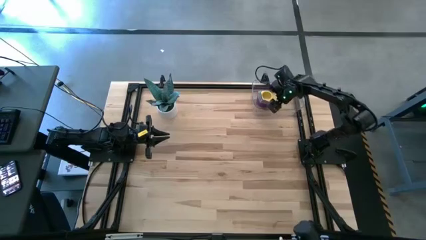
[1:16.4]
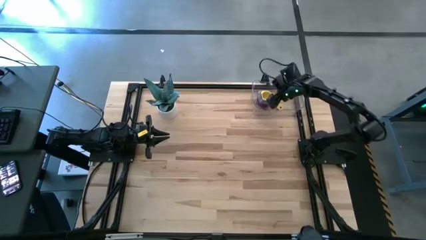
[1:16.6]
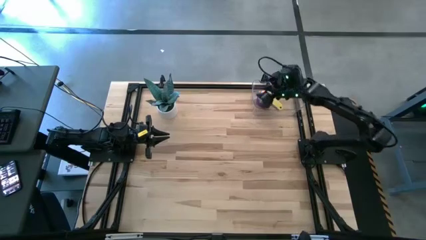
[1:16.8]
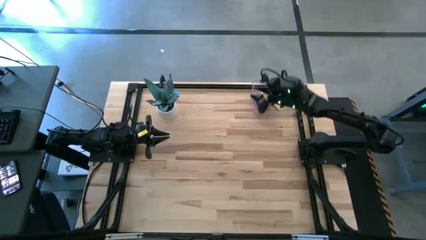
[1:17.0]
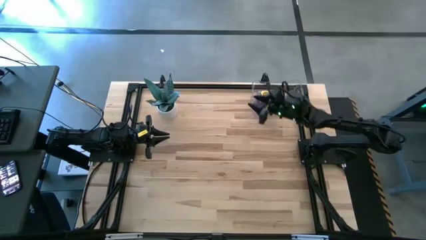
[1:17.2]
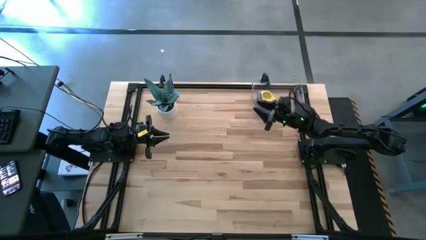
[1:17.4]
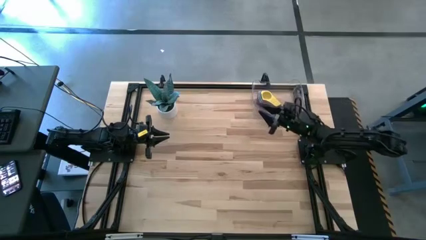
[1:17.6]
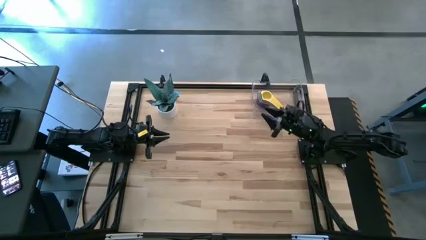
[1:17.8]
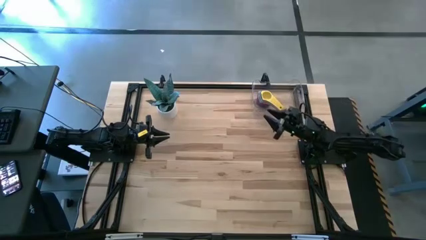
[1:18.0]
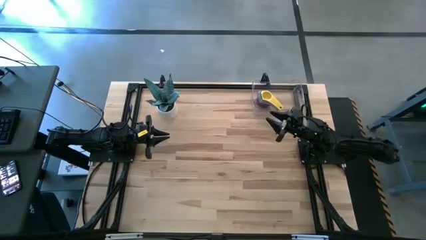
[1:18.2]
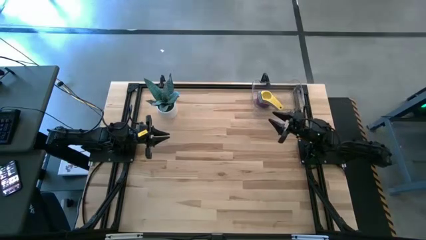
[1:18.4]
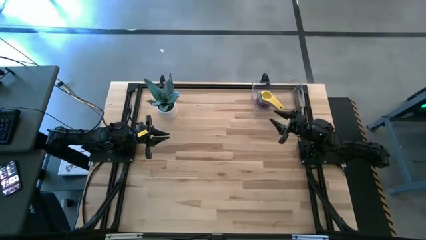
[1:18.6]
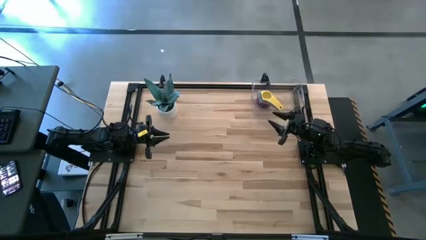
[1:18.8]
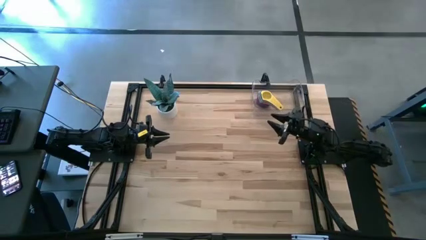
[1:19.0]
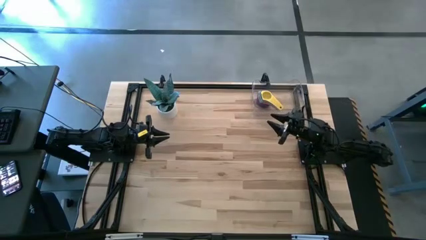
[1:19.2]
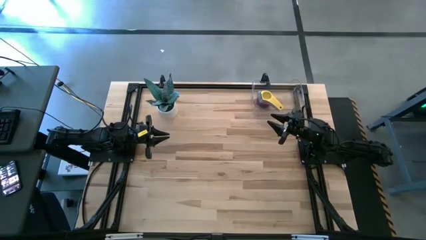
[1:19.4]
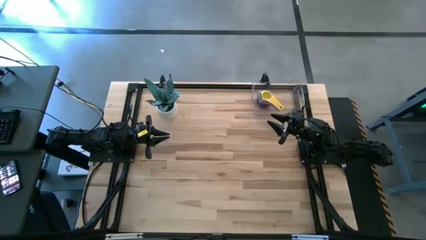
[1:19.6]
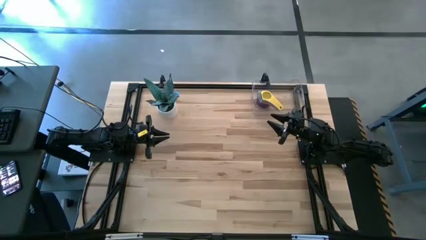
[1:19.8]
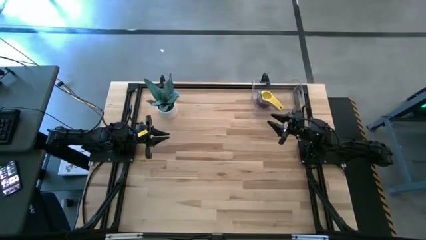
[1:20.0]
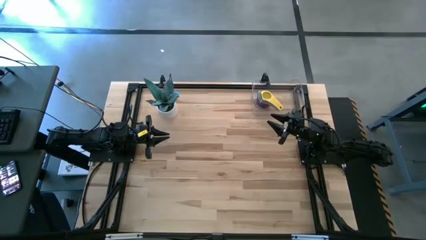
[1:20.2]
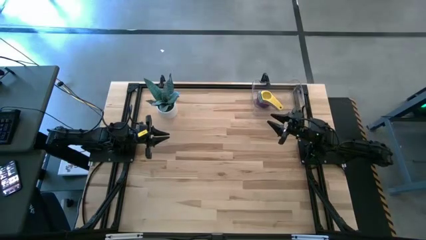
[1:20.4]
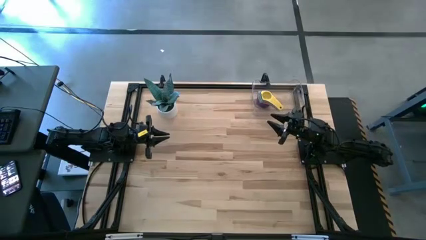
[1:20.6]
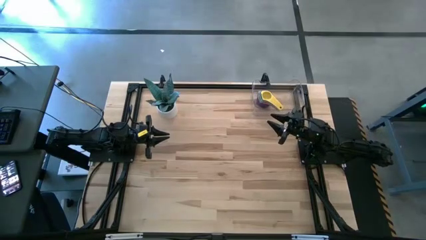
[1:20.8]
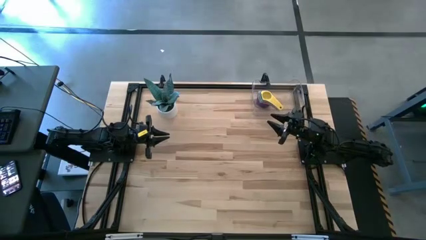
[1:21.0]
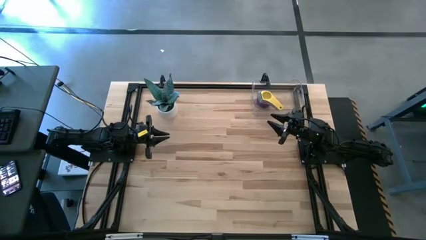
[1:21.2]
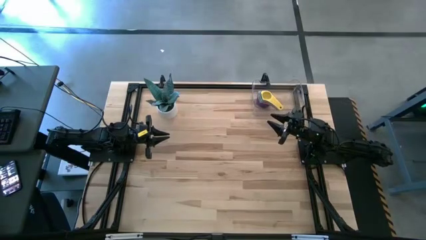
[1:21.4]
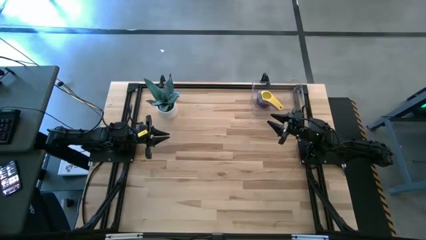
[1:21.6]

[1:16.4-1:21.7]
Task: Nest measuring cups in basket
Return to Home Position

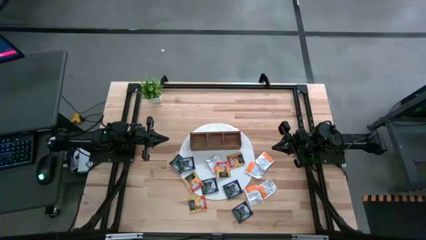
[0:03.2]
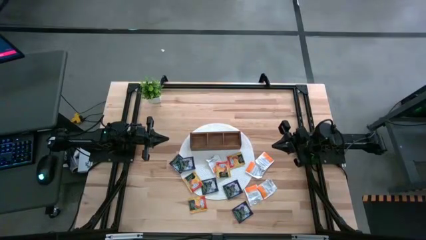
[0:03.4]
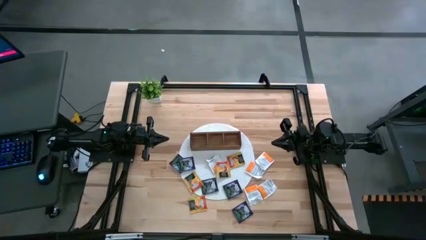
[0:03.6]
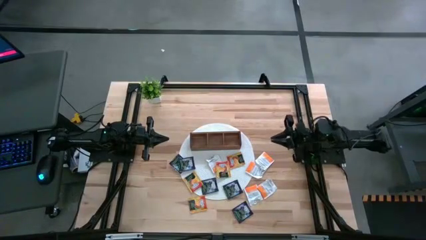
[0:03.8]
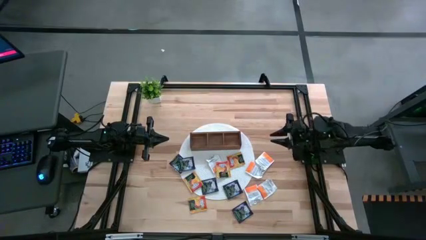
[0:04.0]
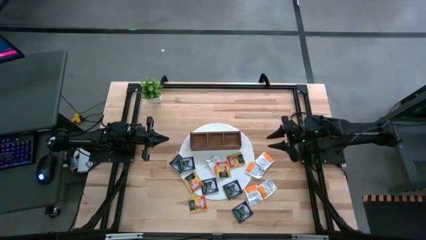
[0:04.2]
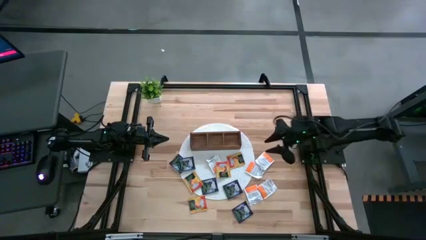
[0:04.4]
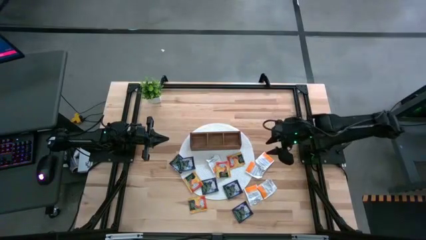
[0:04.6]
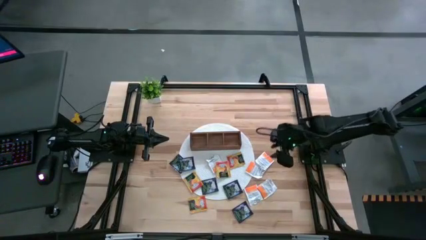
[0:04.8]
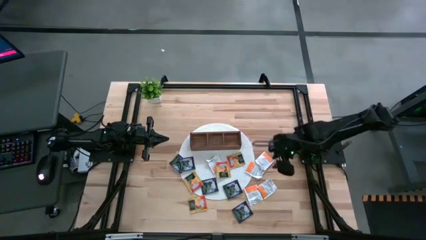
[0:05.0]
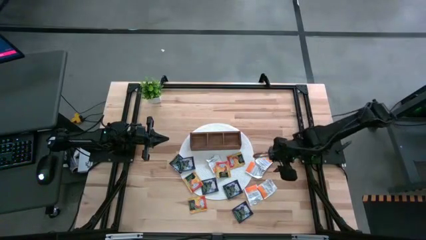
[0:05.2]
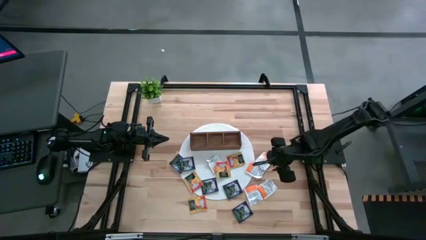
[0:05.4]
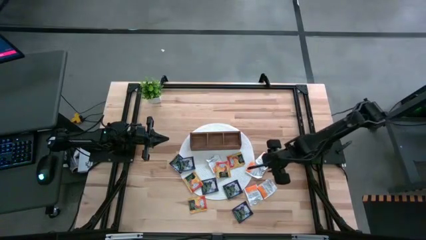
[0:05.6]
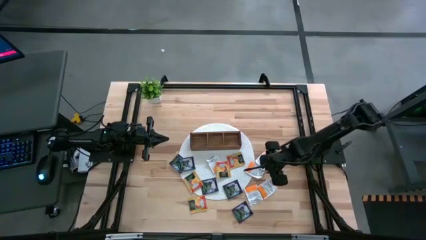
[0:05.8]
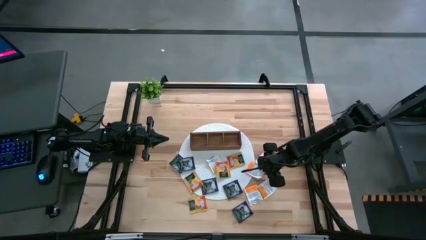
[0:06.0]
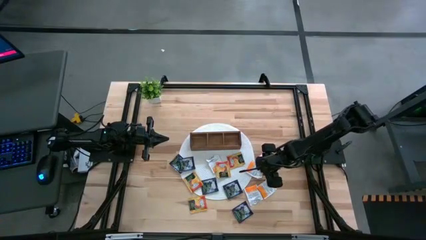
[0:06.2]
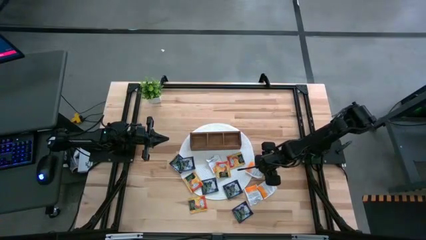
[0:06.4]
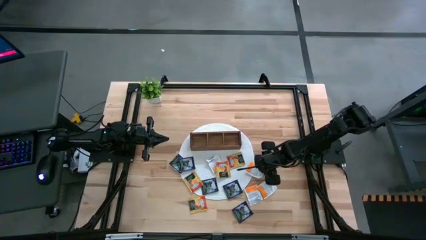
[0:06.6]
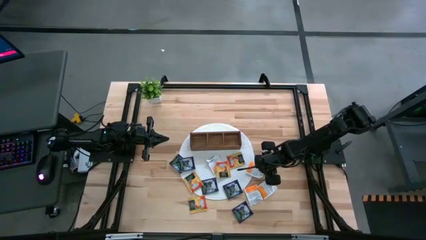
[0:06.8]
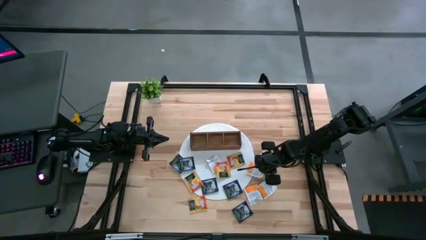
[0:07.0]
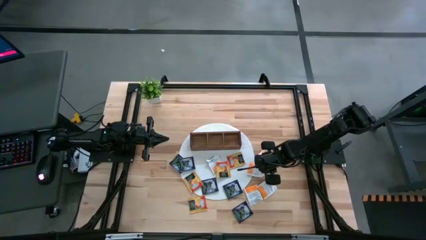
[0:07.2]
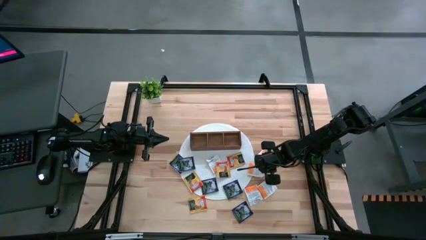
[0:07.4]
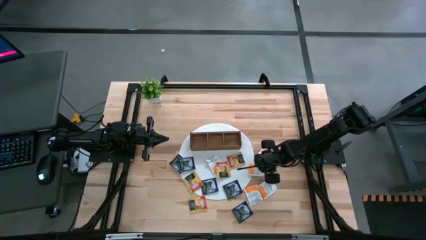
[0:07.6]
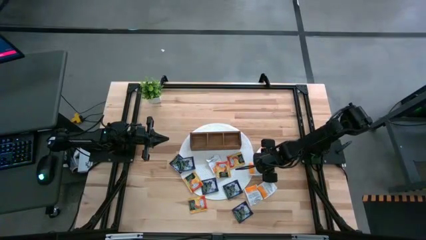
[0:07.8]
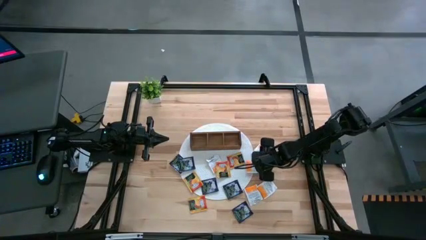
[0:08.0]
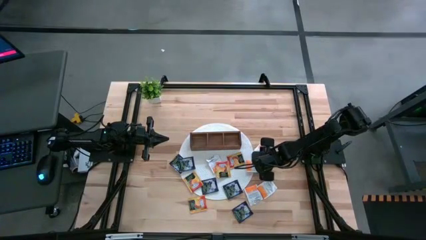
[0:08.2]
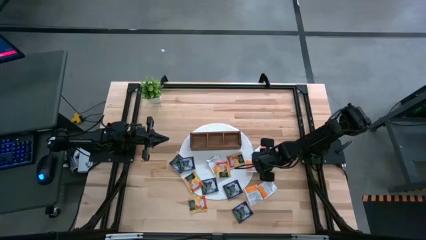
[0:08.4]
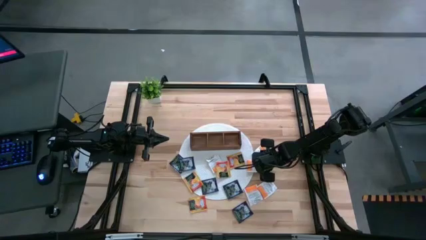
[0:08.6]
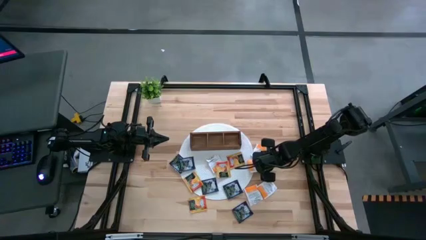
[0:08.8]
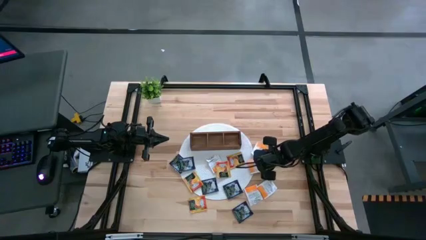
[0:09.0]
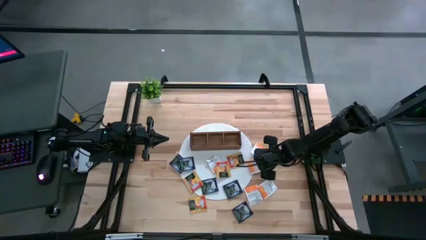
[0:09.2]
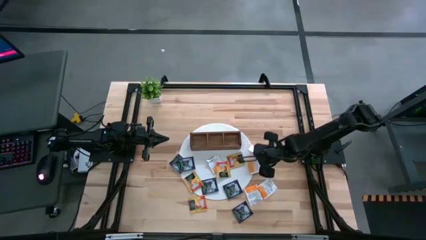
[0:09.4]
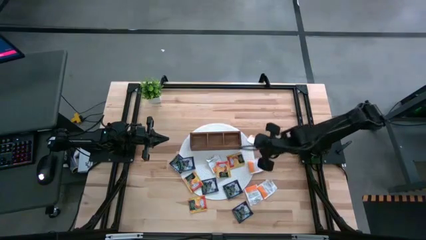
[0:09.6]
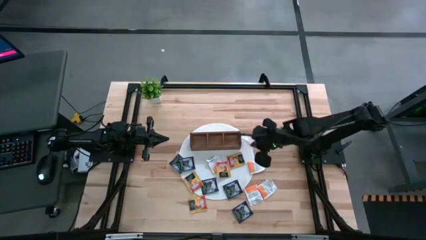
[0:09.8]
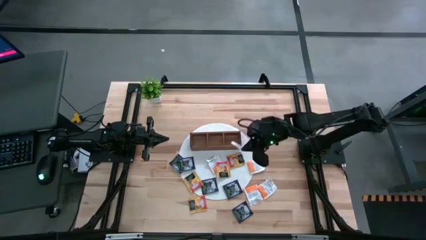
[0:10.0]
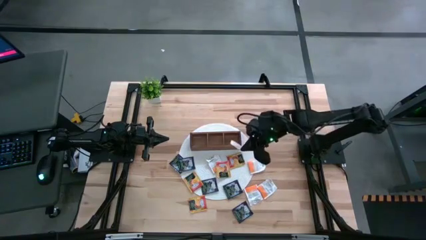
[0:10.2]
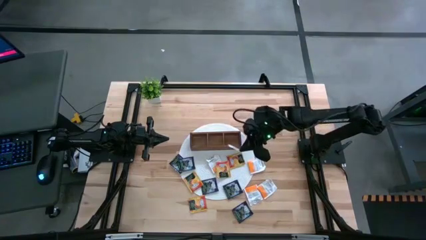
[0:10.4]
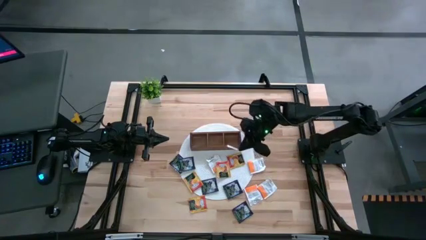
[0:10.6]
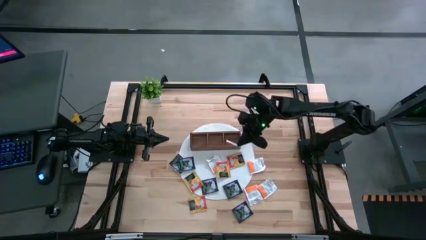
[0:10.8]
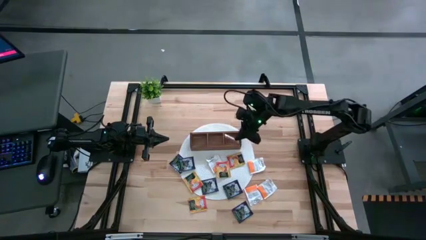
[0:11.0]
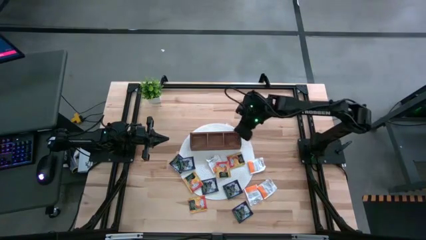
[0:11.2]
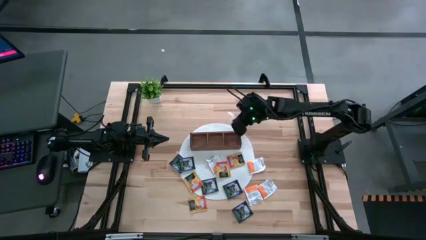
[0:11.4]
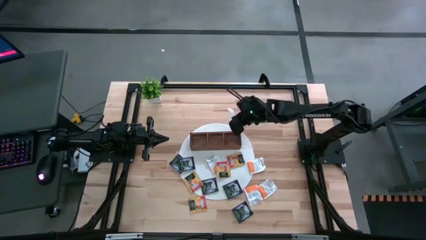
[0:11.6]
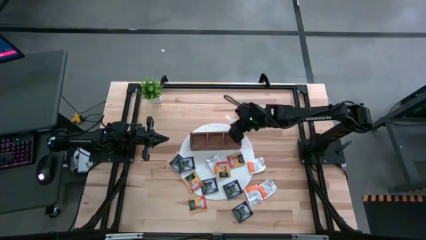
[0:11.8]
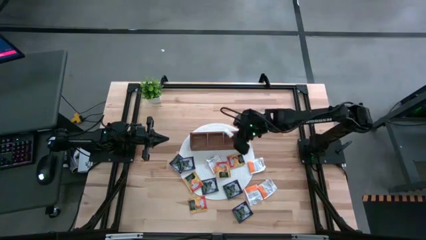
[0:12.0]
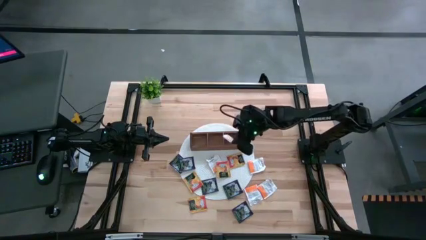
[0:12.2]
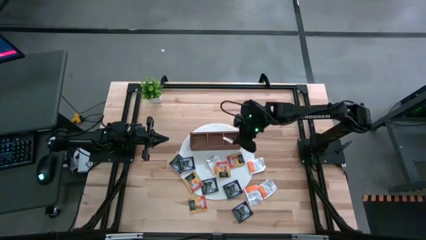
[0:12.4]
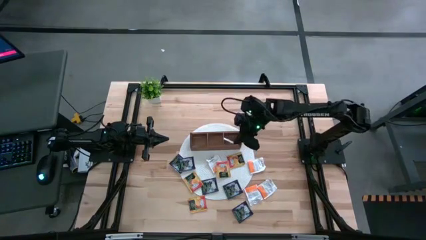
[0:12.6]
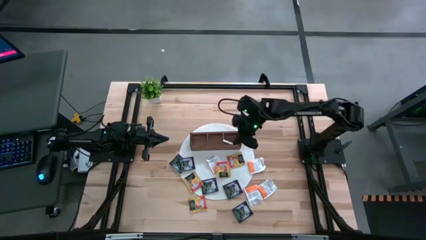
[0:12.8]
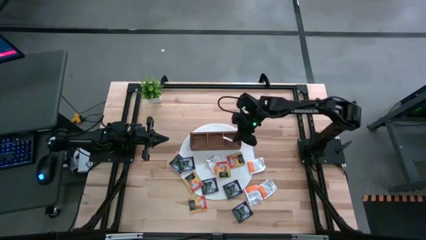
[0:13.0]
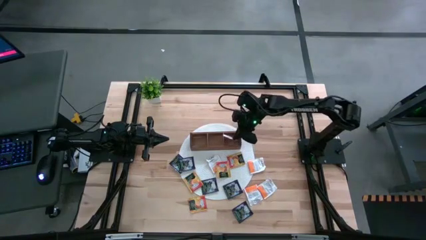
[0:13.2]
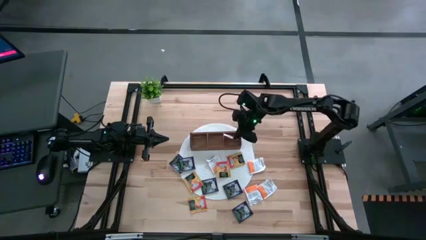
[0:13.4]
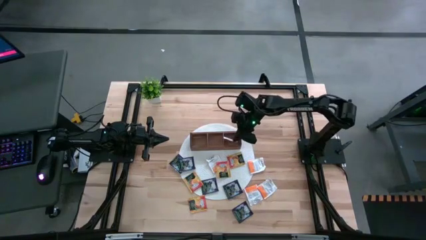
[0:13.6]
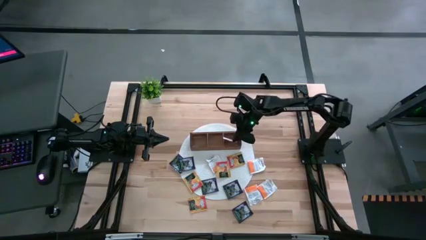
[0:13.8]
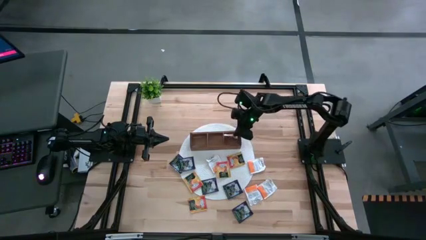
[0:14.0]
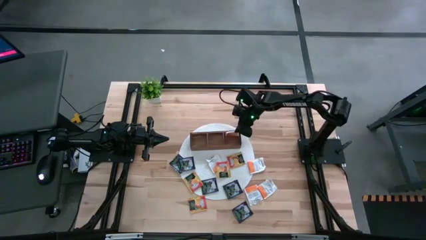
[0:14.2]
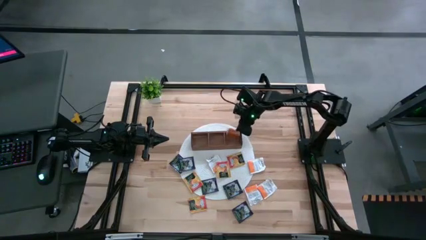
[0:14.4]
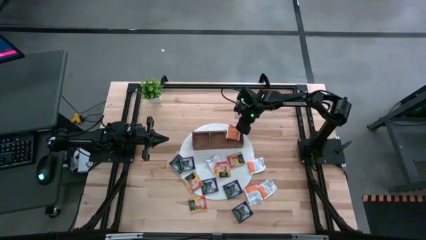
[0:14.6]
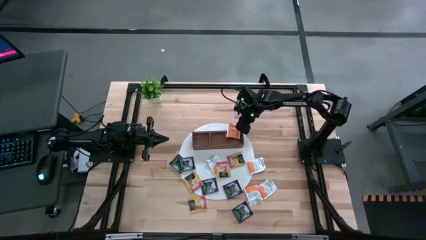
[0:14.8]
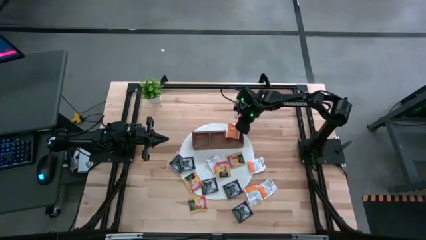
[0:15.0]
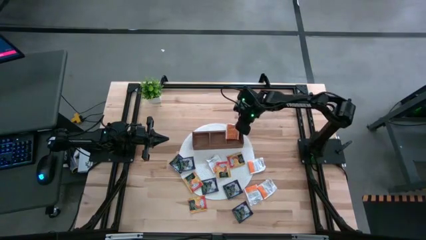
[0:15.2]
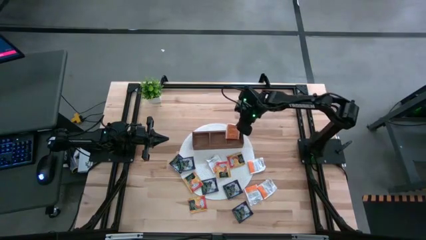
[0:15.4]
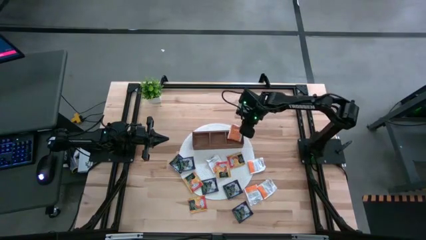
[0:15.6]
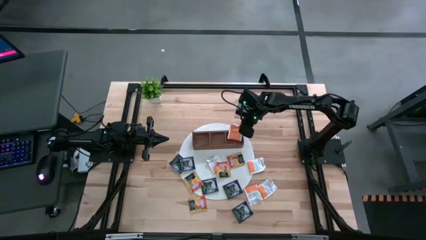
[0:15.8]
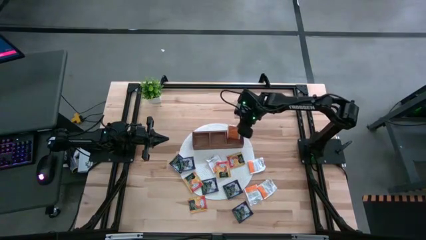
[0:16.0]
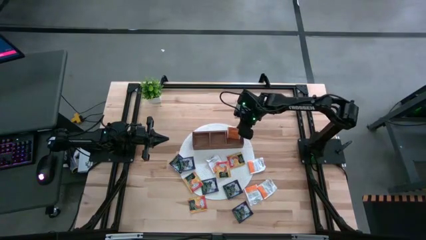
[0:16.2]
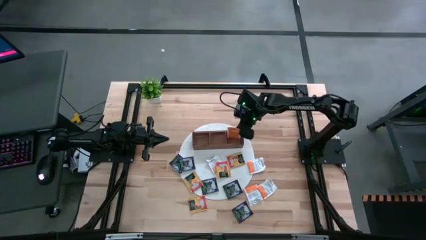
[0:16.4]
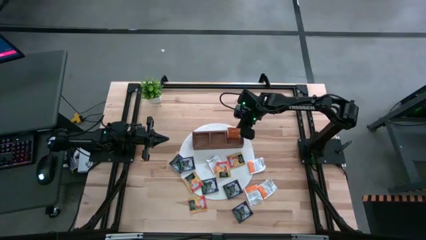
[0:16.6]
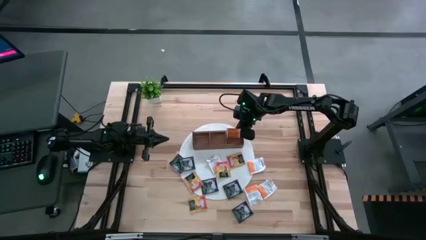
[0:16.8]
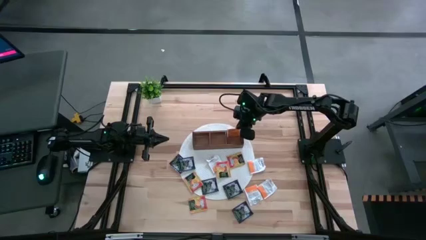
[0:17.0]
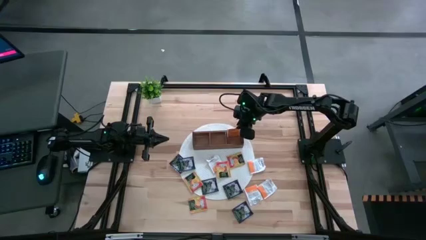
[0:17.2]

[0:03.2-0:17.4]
Task: Pick & Place Tea
Put the white tea bag into the right section of the wooden organizer
